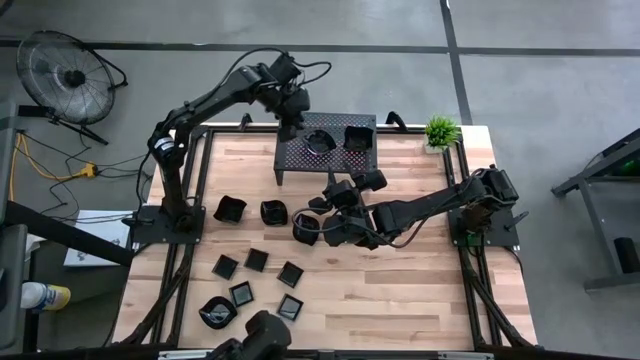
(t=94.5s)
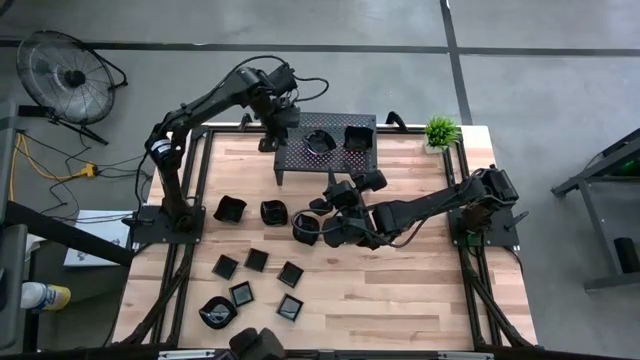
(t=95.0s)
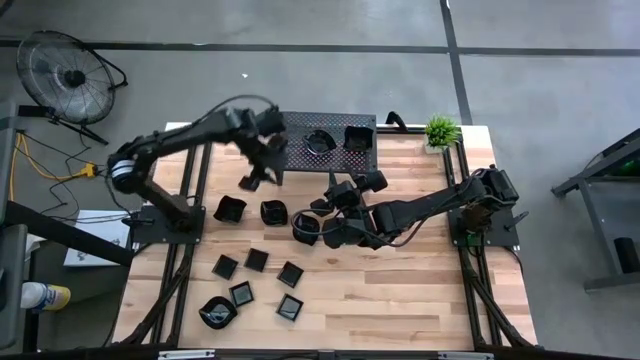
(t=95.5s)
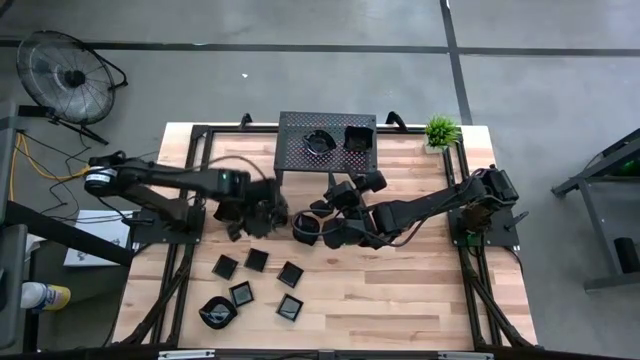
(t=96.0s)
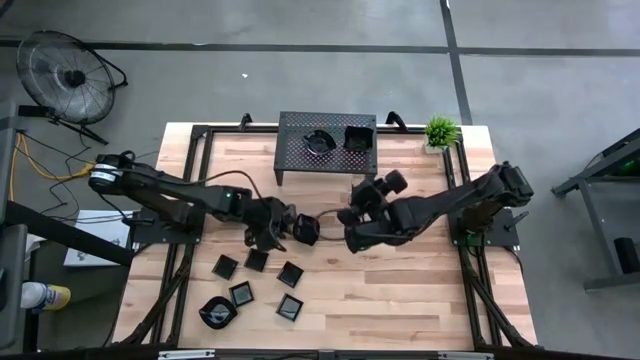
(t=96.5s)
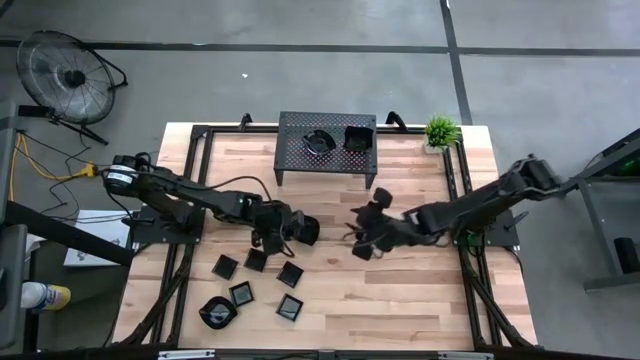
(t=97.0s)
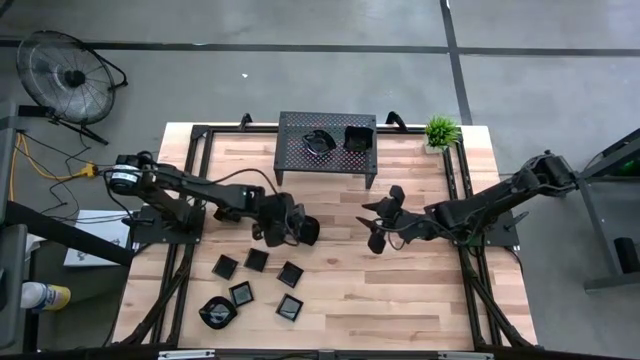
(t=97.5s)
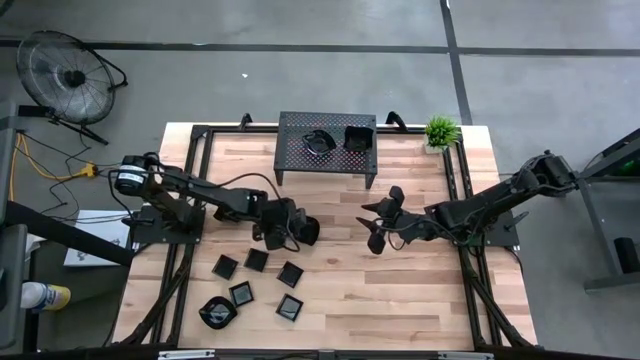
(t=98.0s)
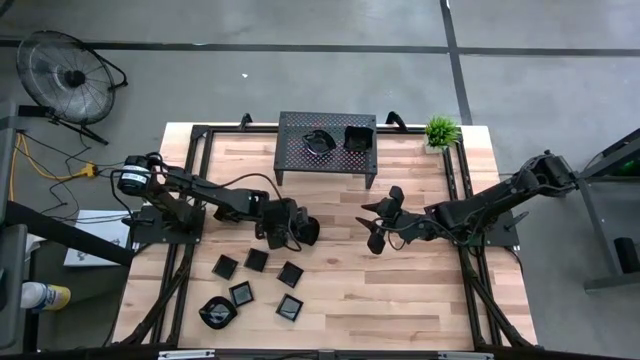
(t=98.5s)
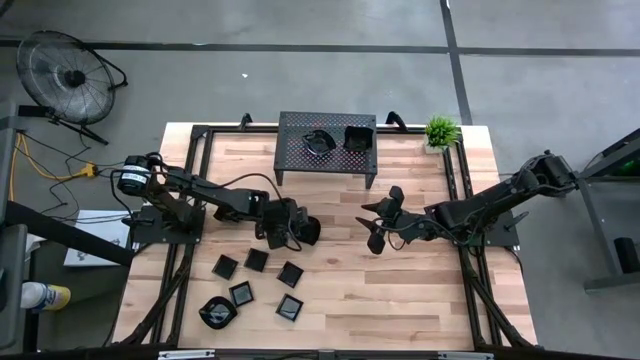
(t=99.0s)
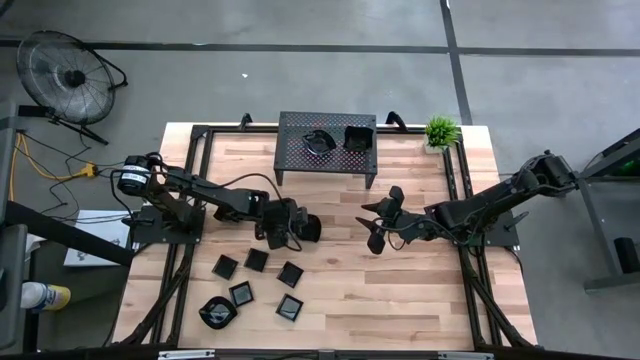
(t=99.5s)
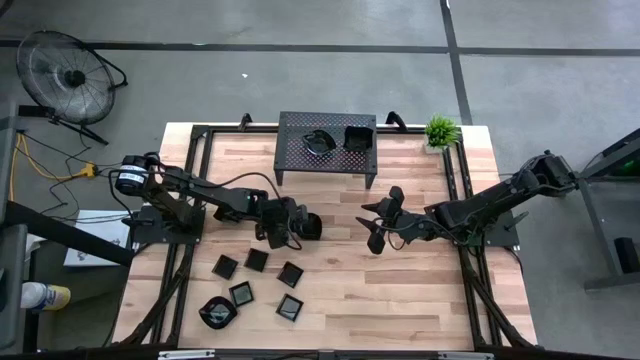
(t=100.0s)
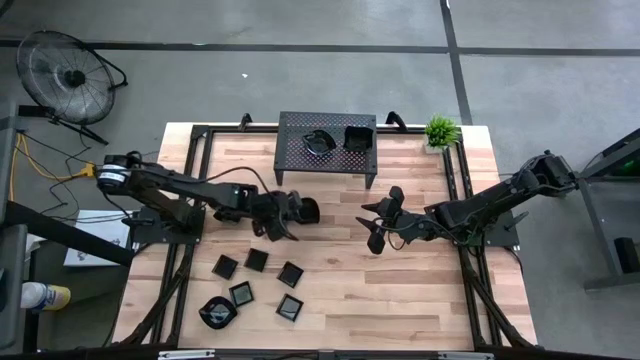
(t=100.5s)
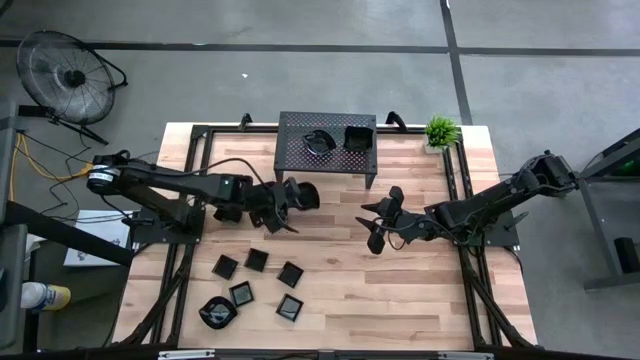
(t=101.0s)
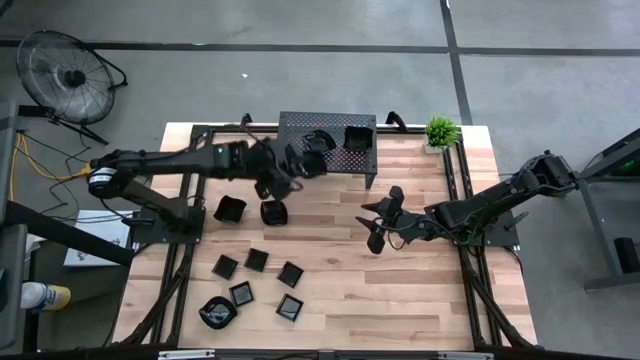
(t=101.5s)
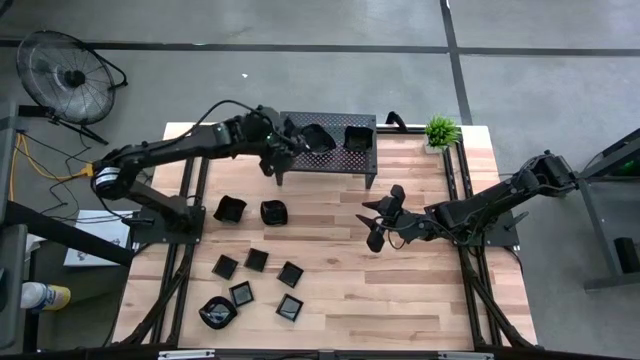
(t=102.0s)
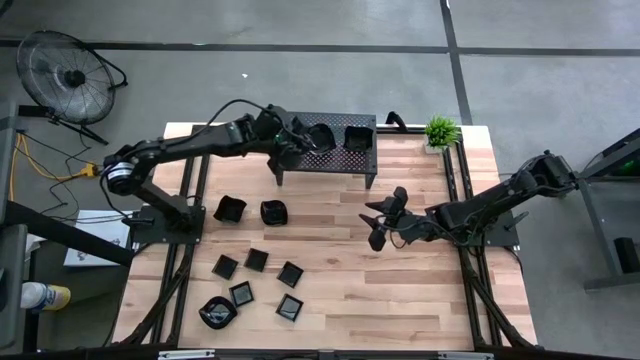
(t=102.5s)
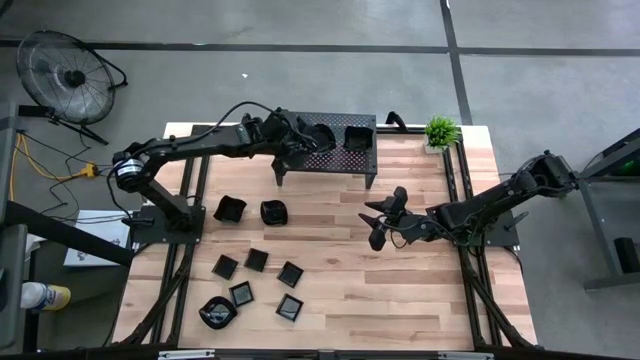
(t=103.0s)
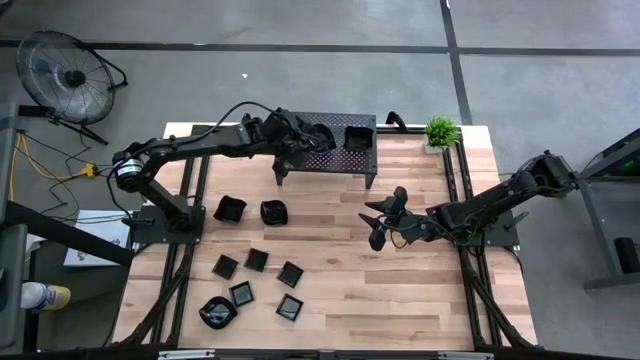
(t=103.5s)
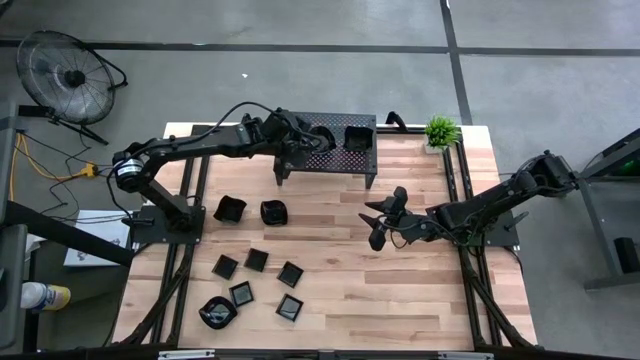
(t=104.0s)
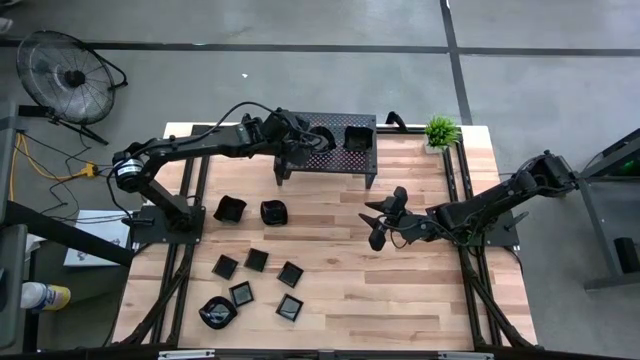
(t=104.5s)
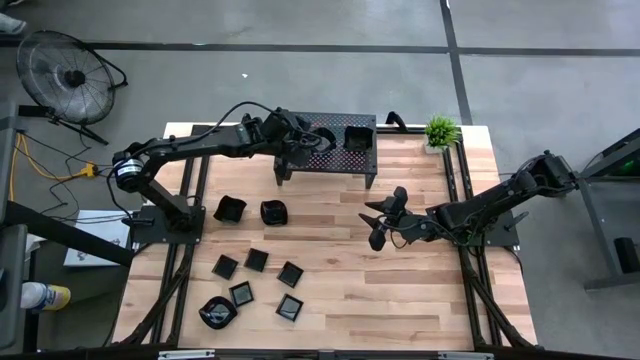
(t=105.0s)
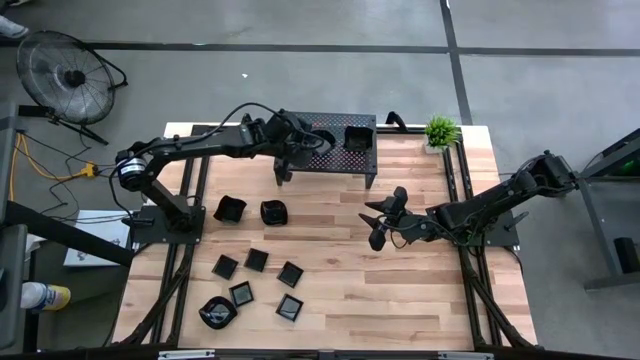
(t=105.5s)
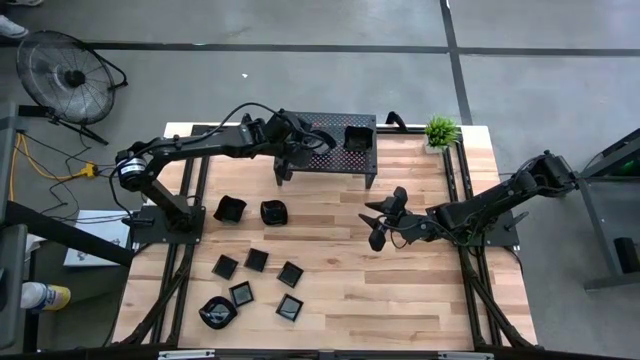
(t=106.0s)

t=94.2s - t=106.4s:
Task: Pick & Place Mini shaped plates
Stack the top right black leaf shaped plate on top of the black leaf shaped plates on the shelf

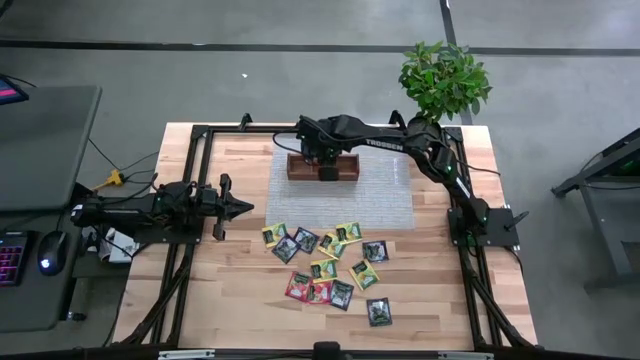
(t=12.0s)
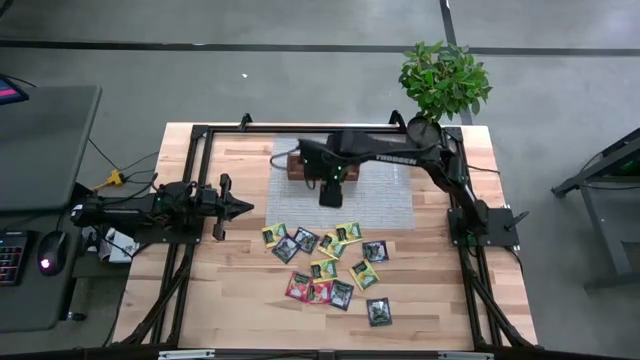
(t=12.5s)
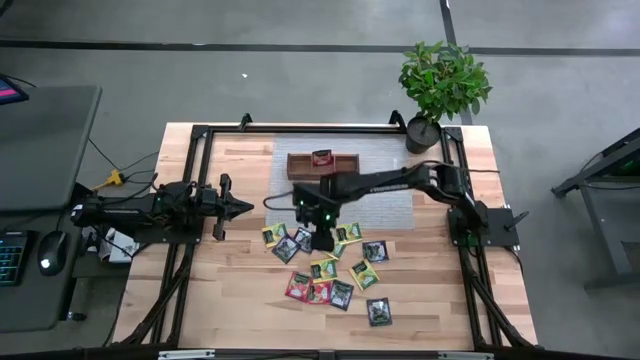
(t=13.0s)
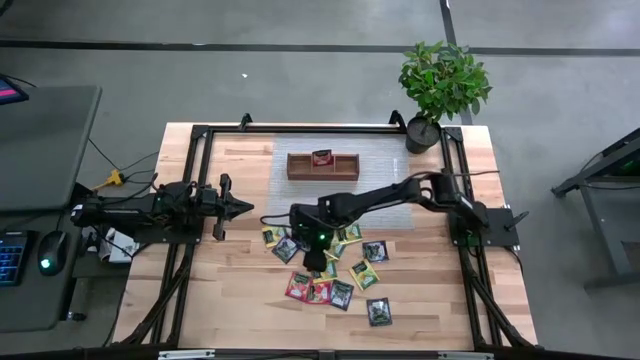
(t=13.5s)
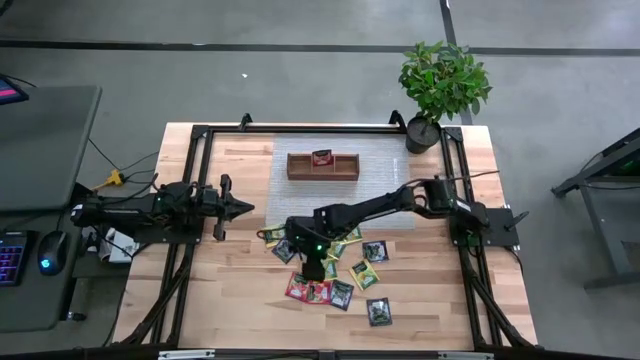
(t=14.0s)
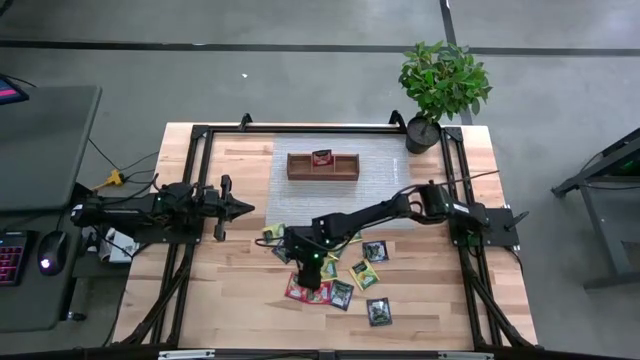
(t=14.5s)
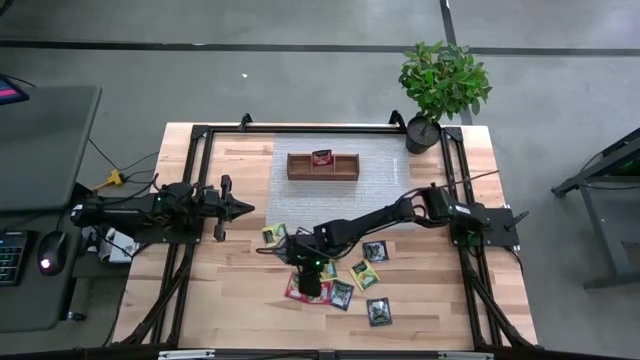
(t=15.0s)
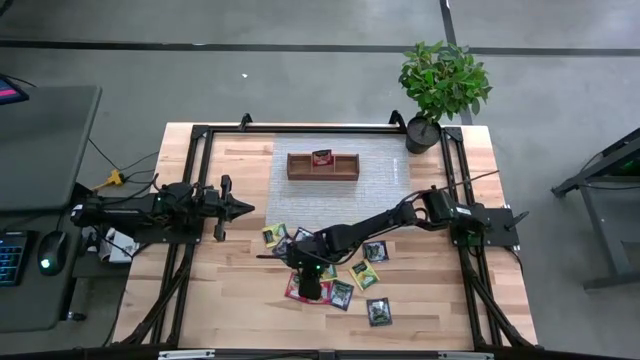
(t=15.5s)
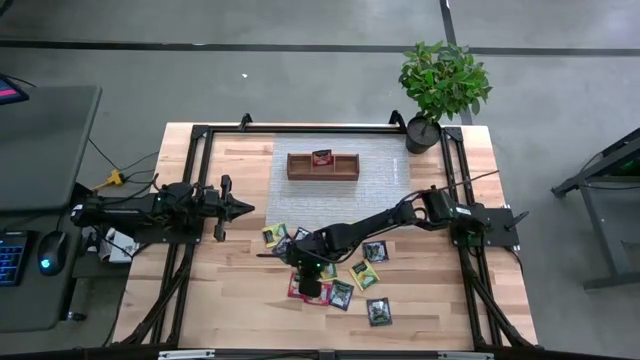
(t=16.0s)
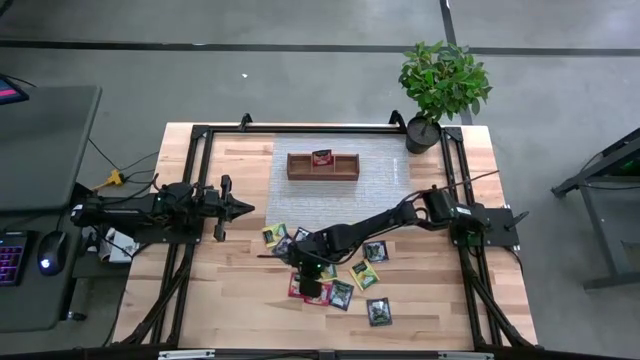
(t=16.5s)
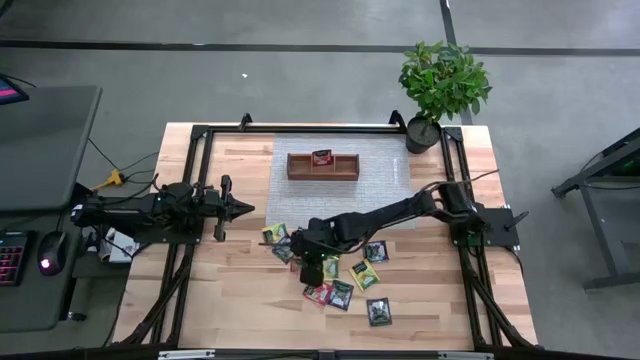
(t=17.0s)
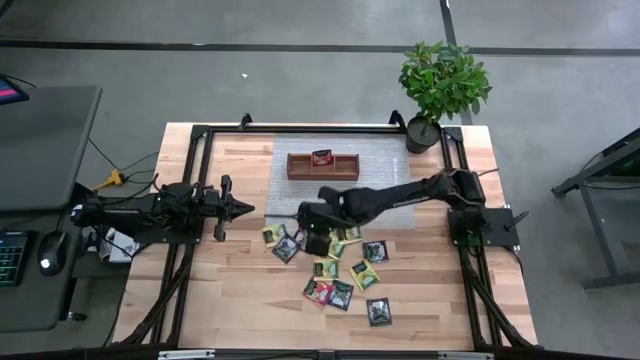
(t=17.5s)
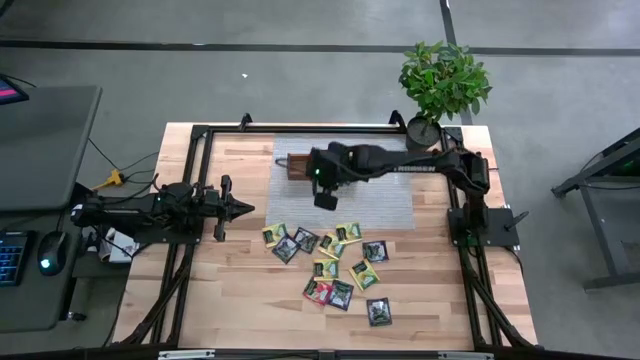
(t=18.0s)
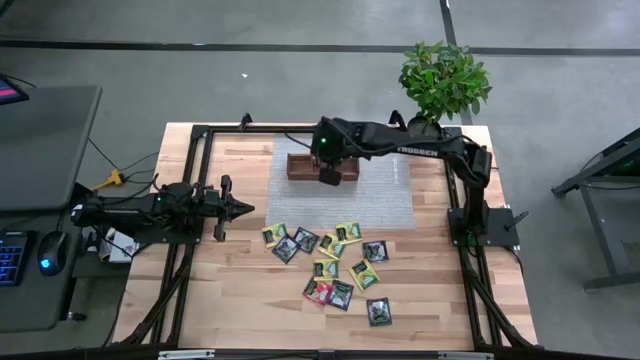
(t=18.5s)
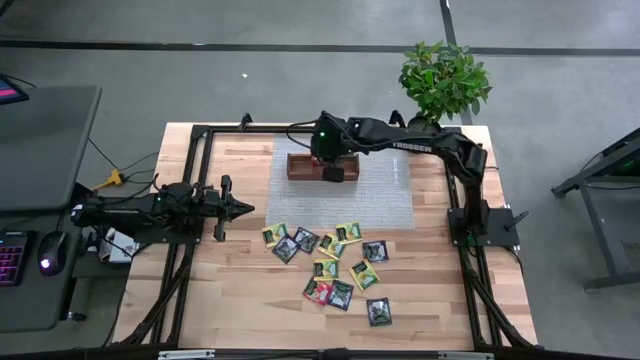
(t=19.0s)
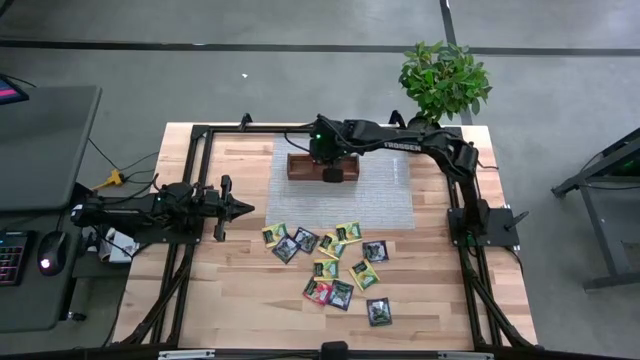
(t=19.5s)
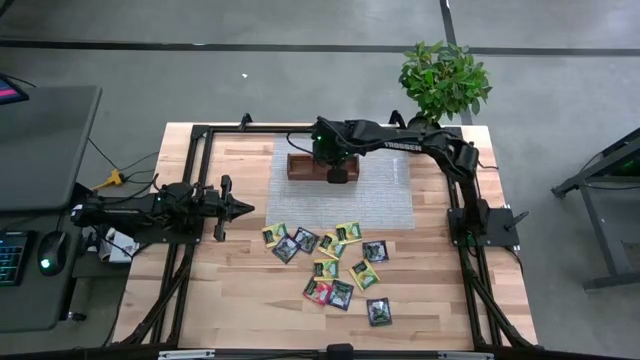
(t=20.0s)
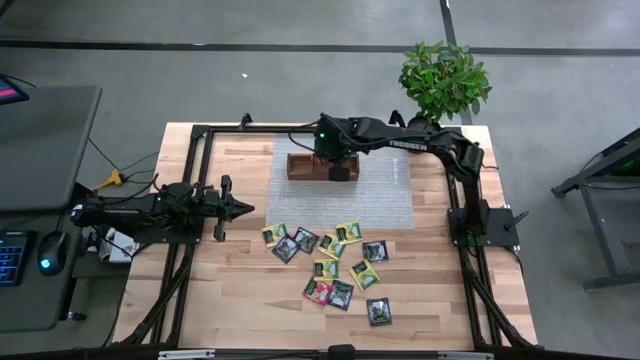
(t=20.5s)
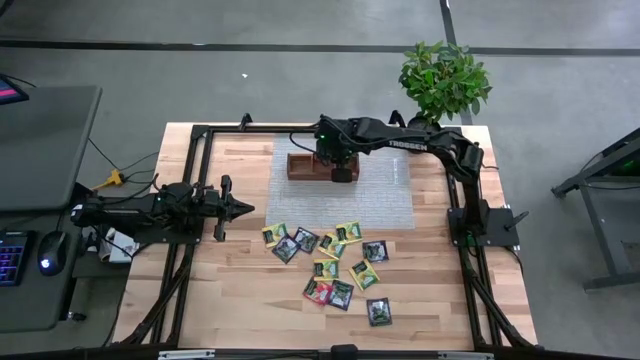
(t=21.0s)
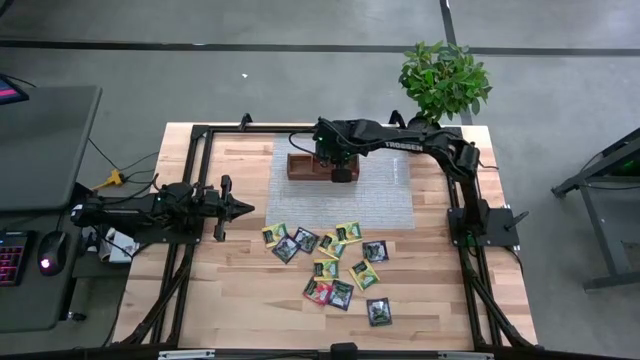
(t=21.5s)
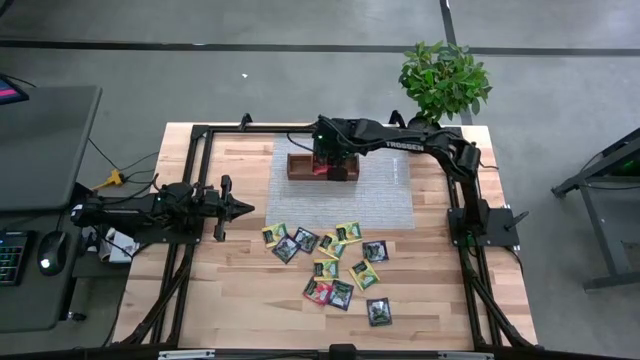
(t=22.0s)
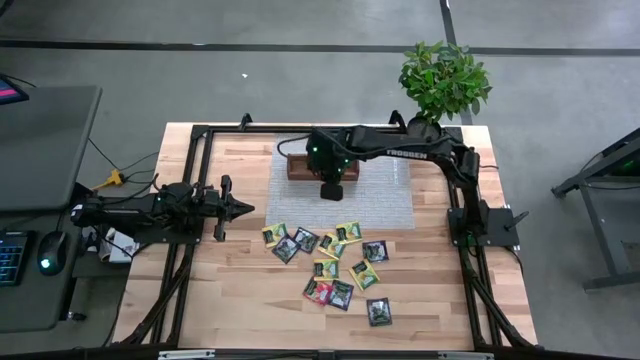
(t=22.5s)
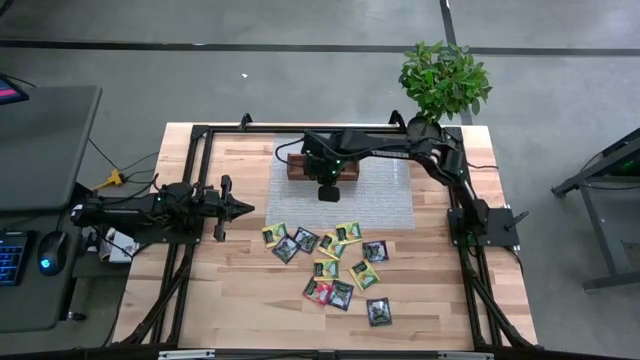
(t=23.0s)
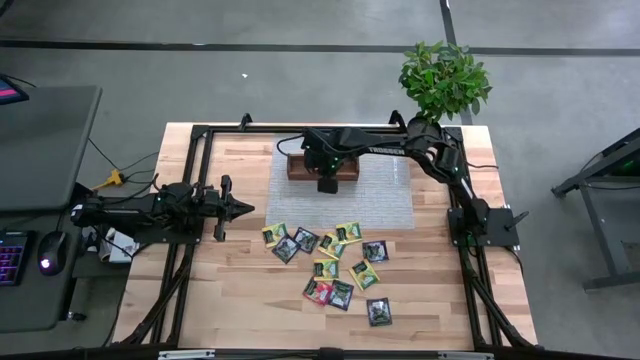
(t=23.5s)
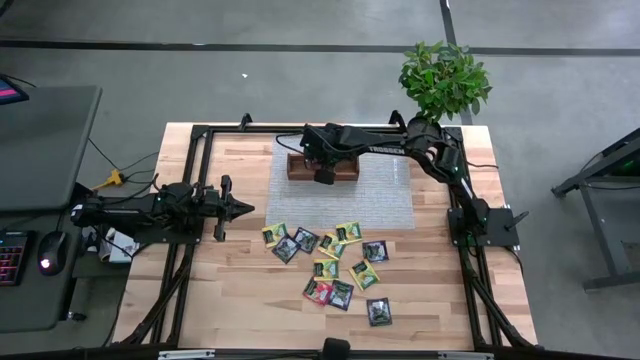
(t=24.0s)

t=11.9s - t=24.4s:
Task: Pick & Place Tea
Put the red tea bag into the middle section of the wooden organizer
